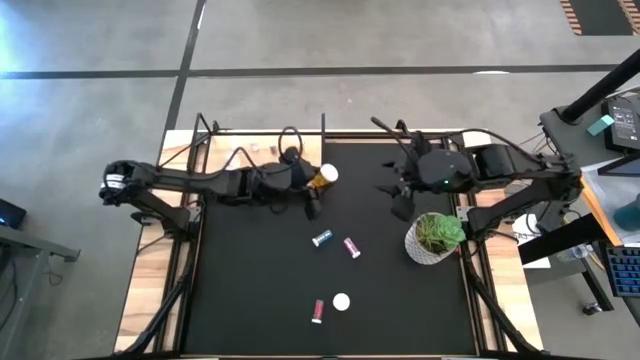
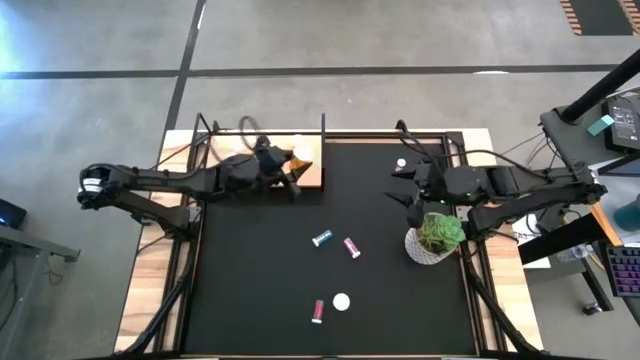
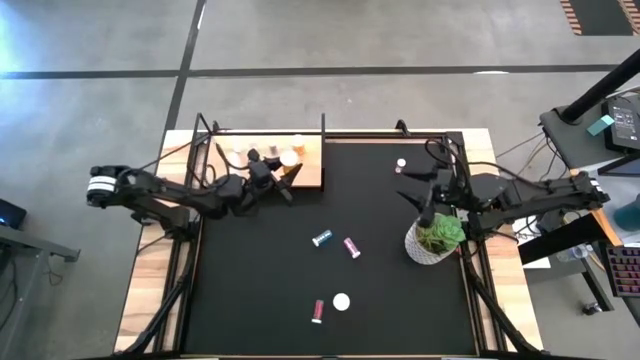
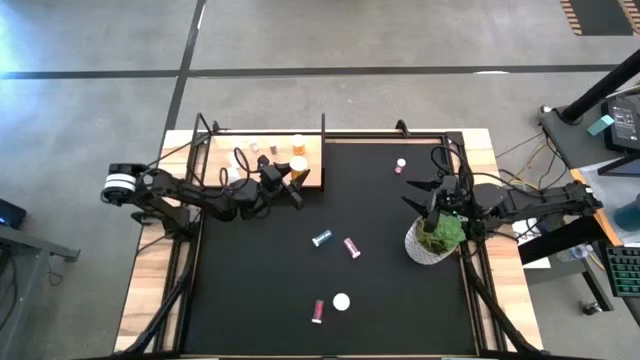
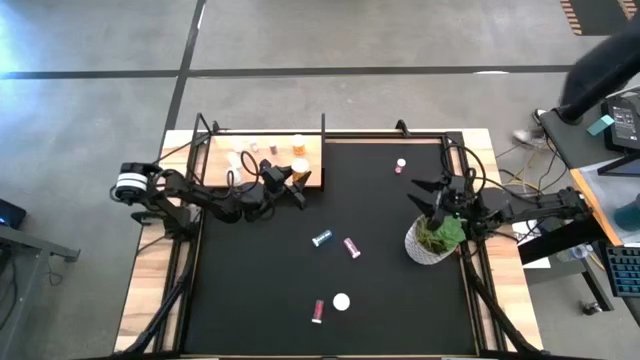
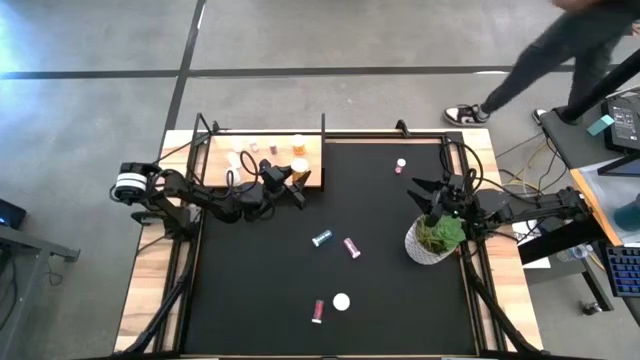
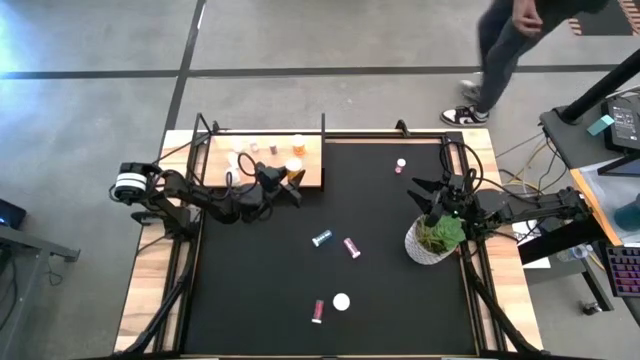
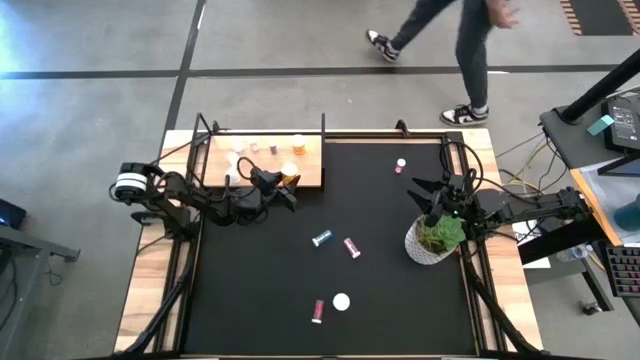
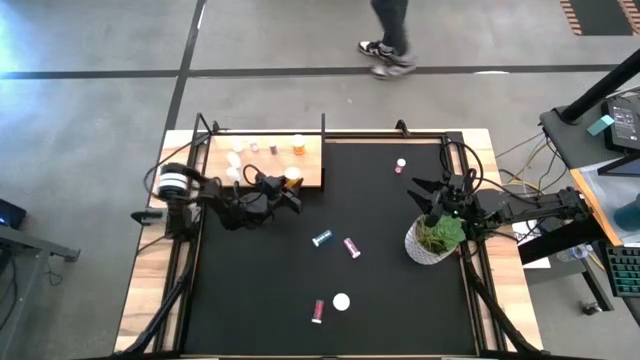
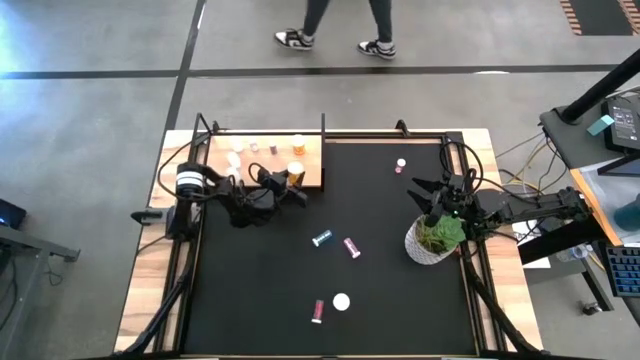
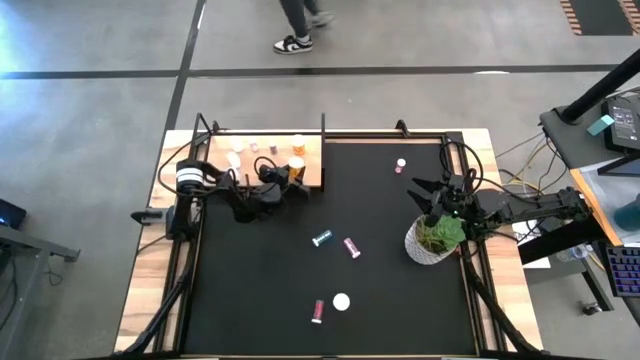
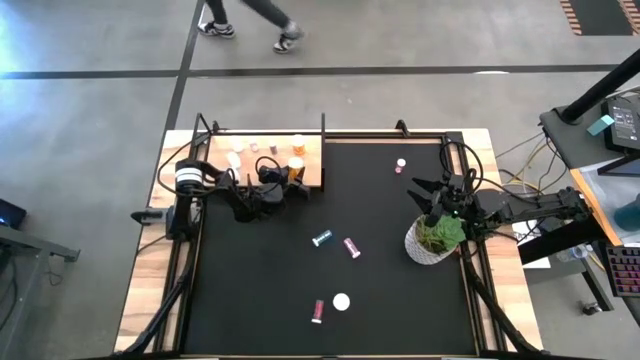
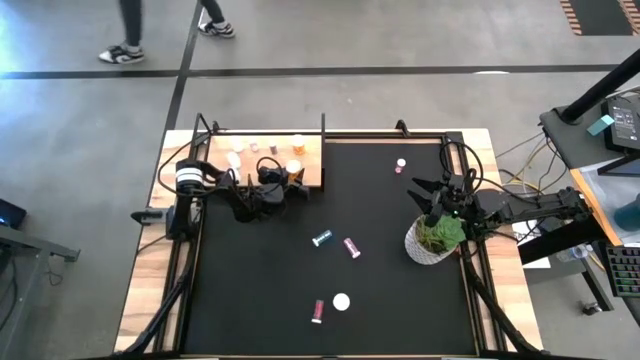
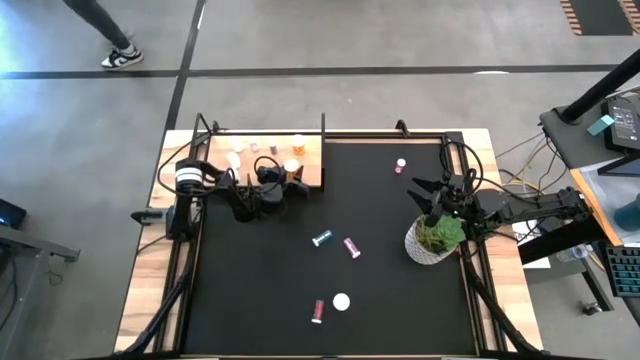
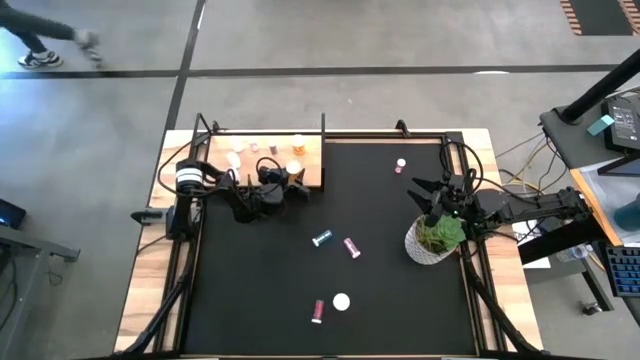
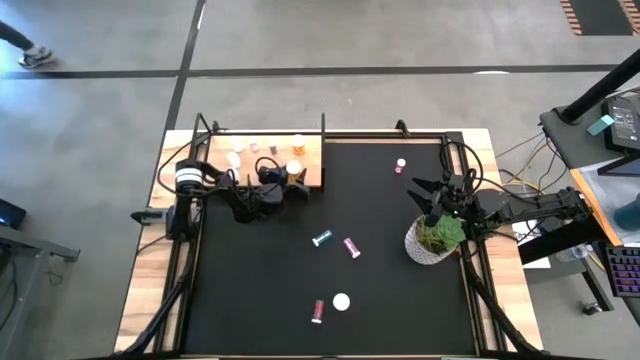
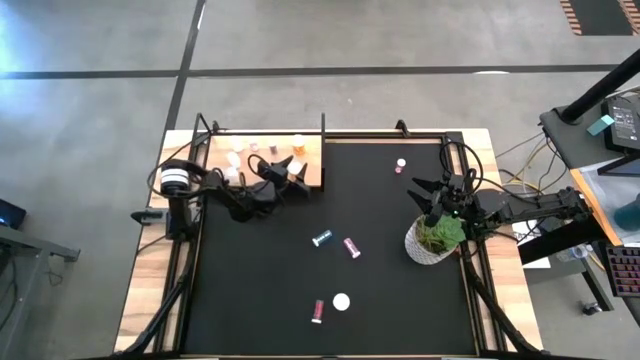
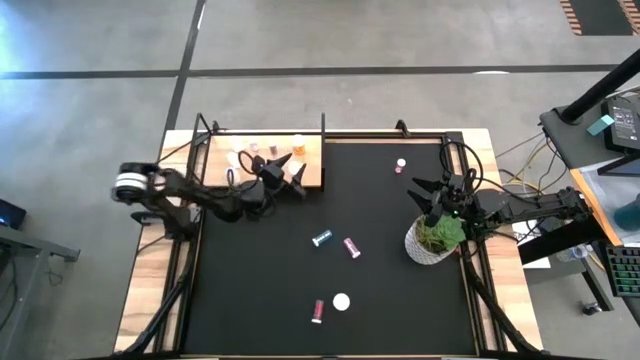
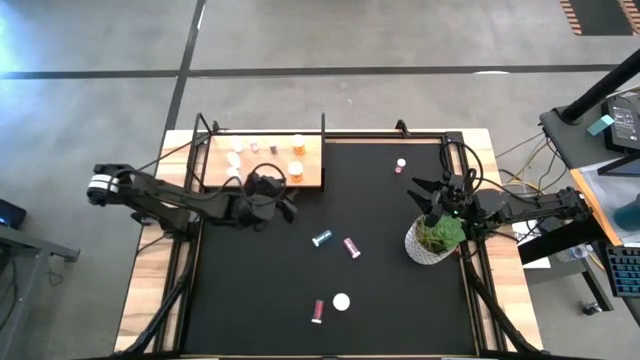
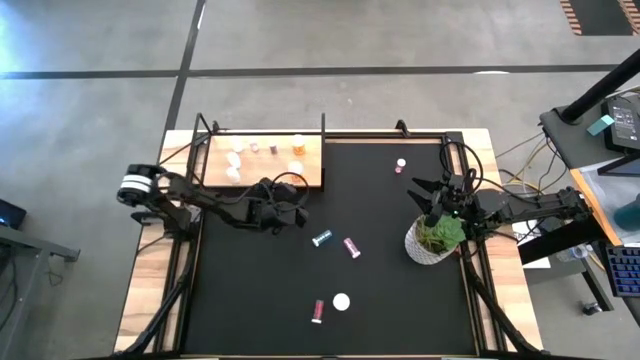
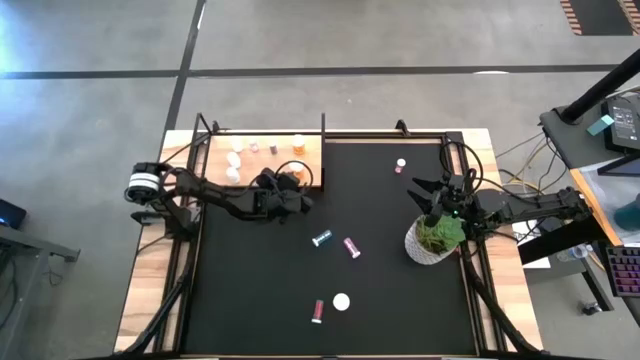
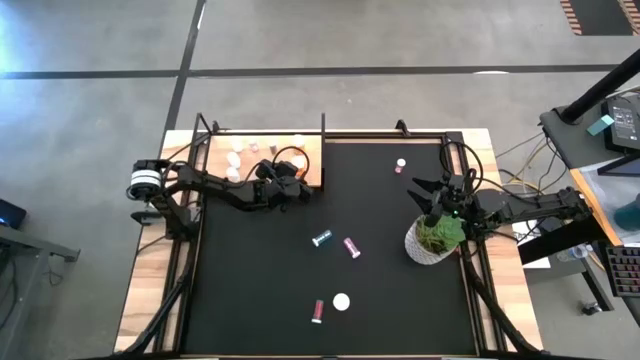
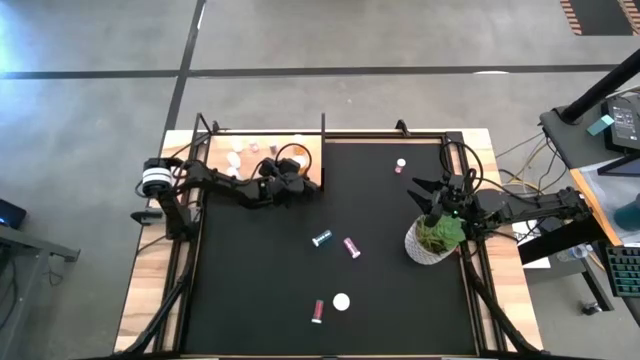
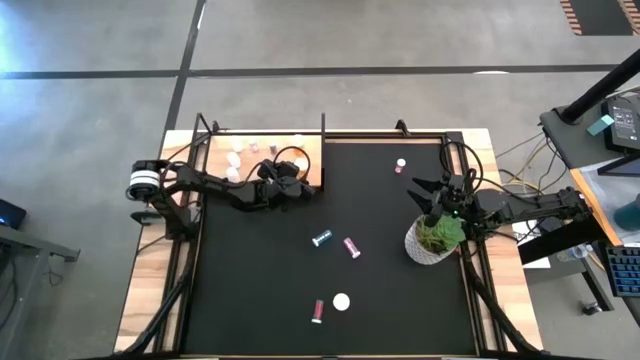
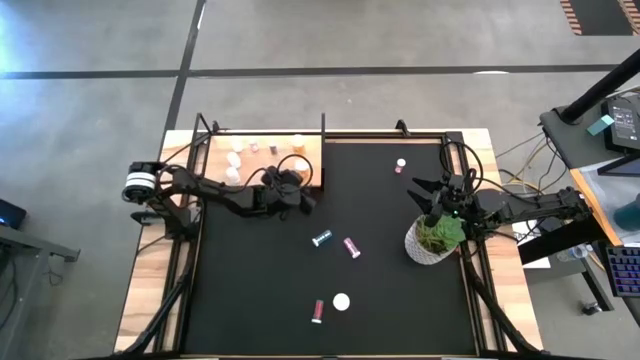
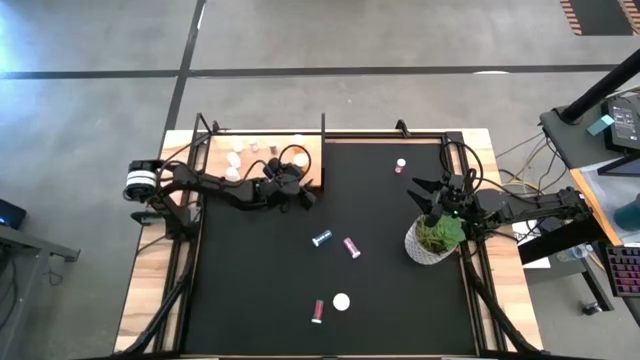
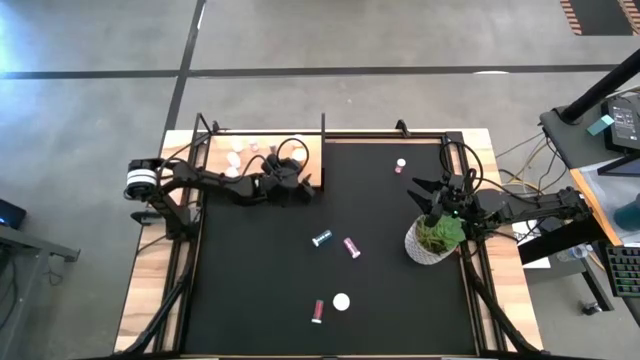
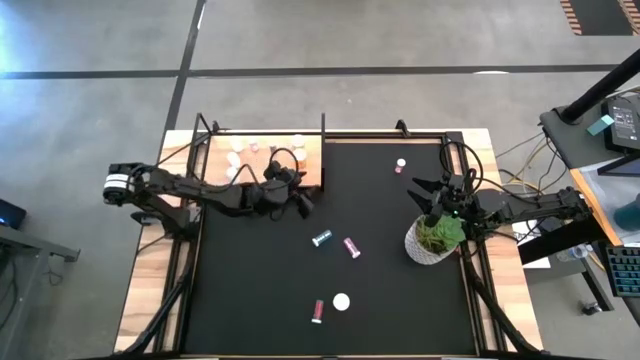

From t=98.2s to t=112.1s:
Task: Pick and place medicine bottles onto shelf by color
Put the right orange pill bottle into the shelf

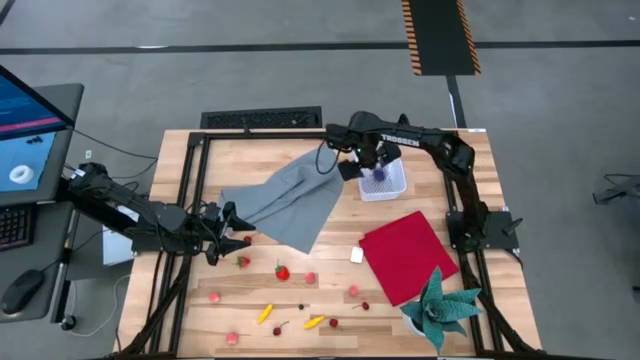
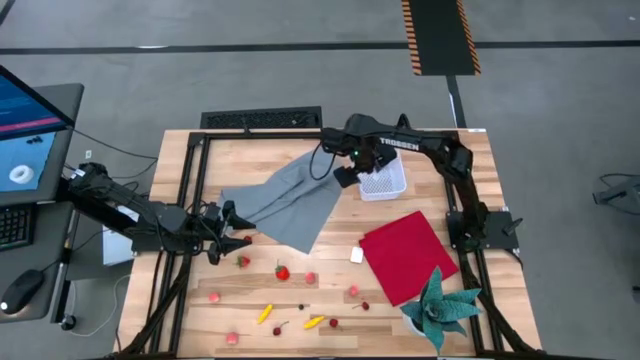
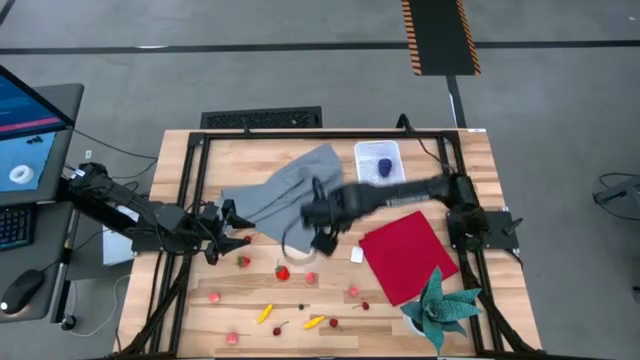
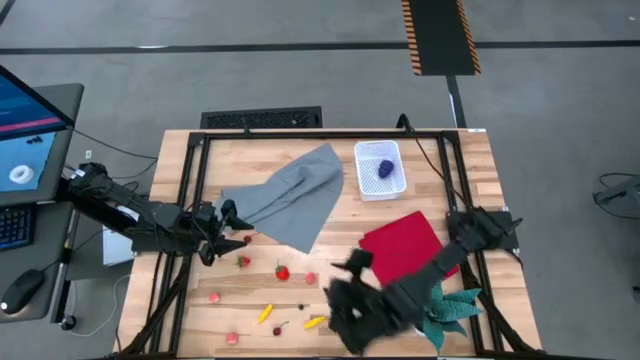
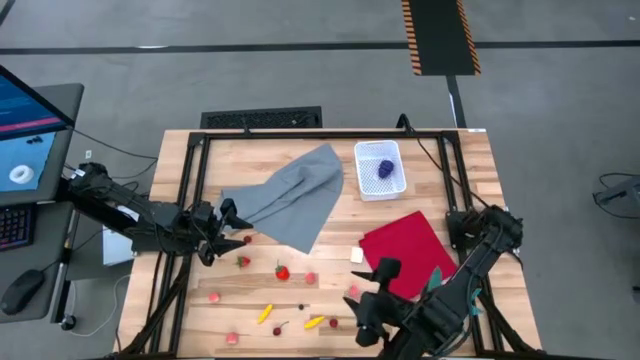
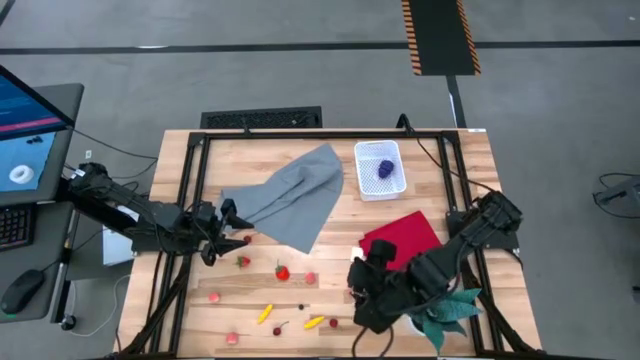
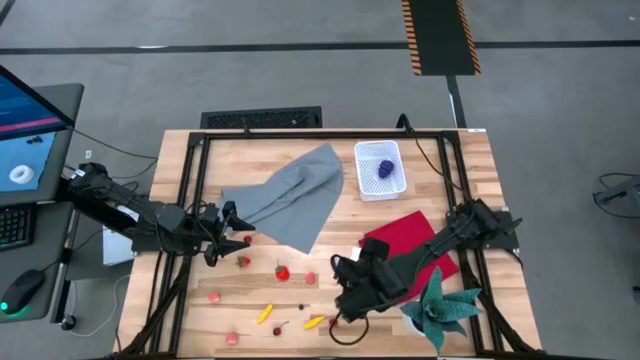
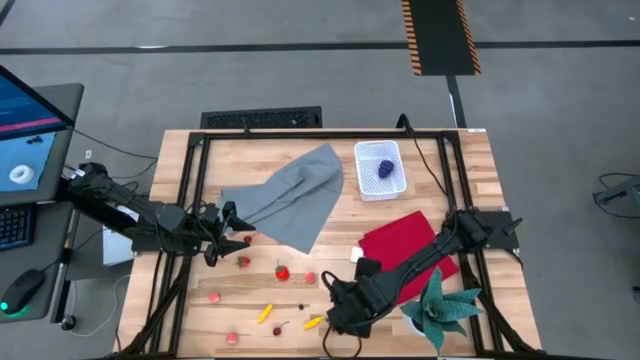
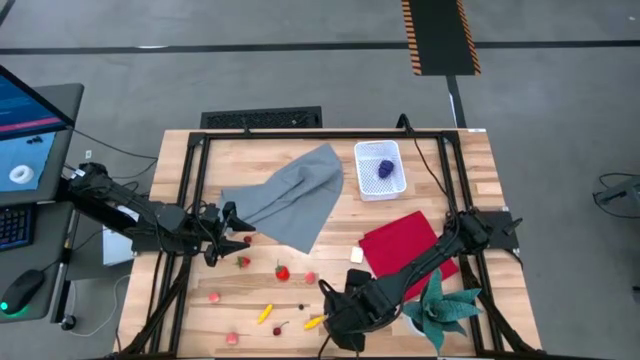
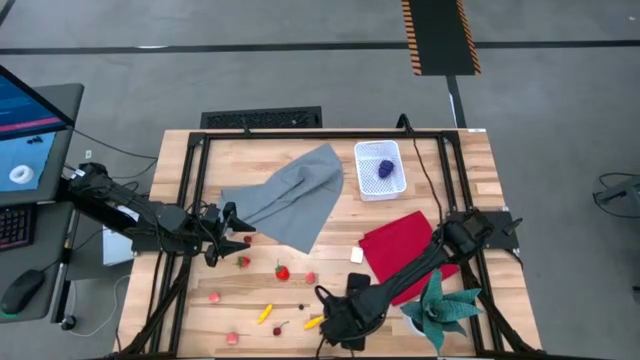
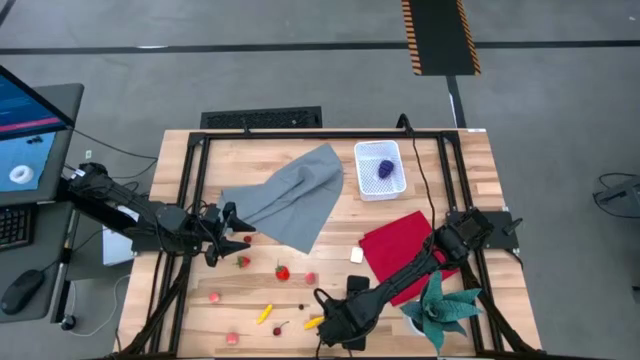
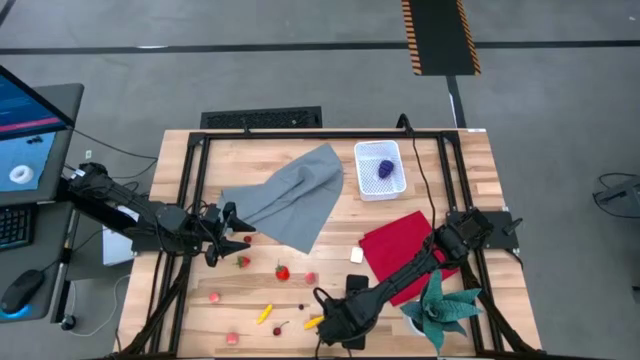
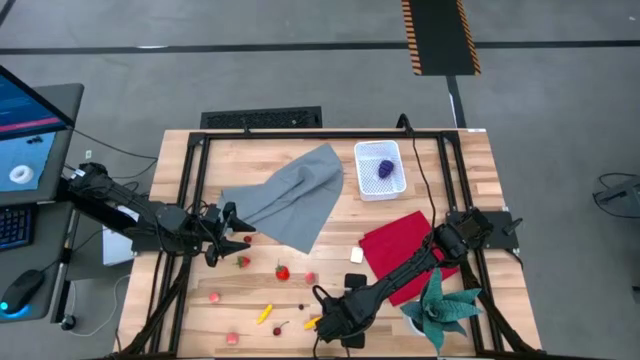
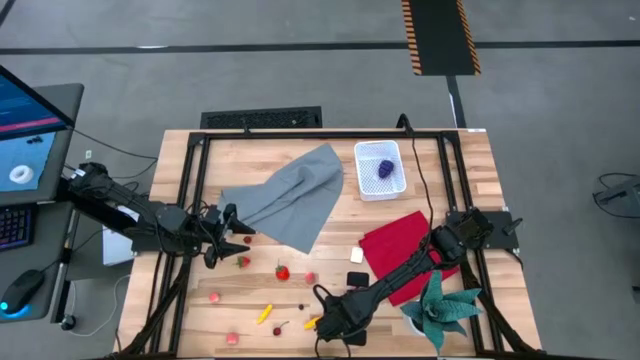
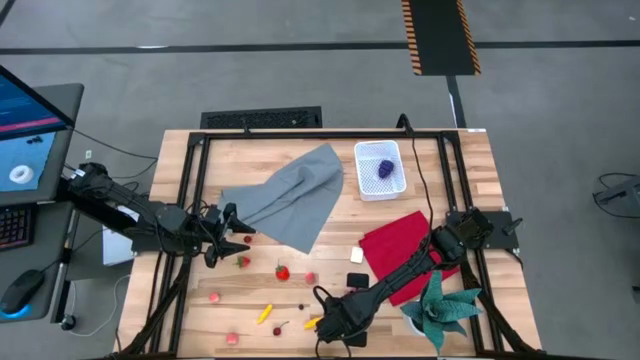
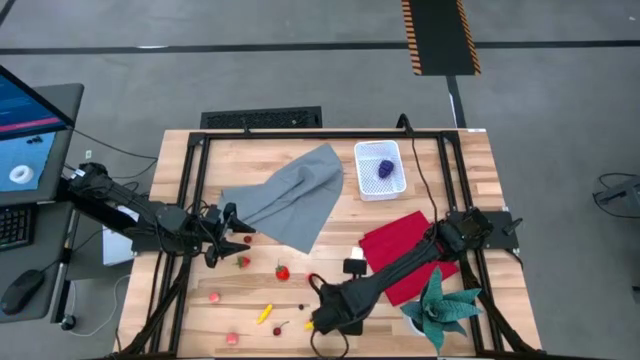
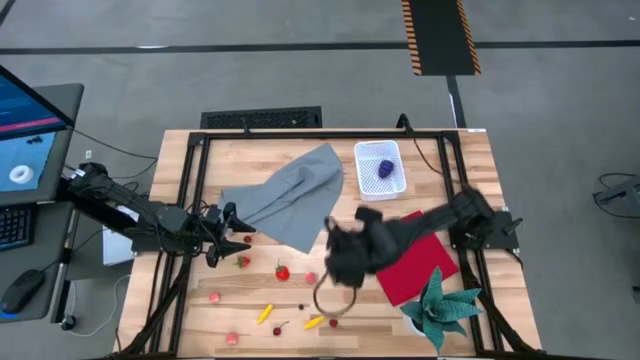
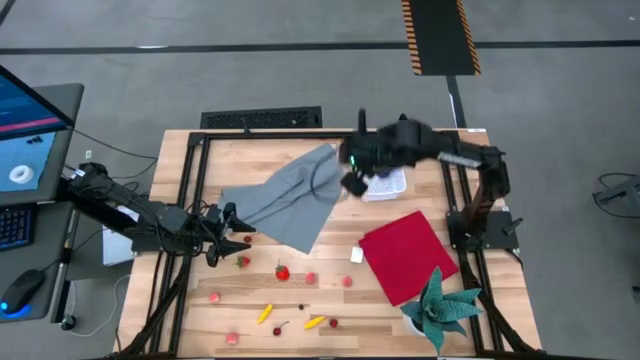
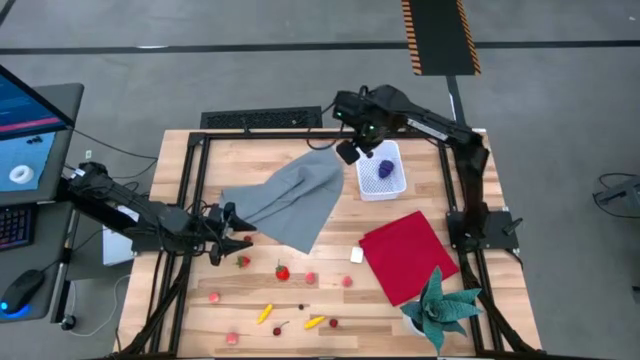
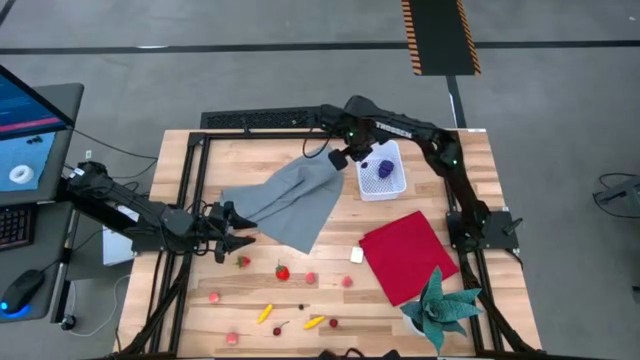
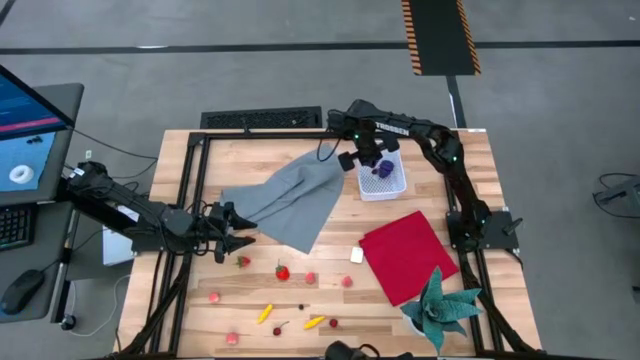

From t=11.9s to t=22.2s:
Task: Pick and placing Produce into tupperware
Put the red cherry into the white bin
